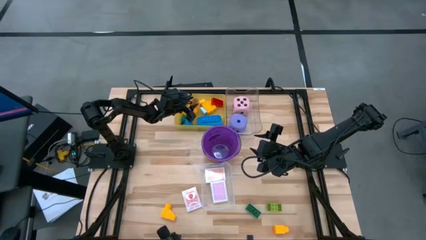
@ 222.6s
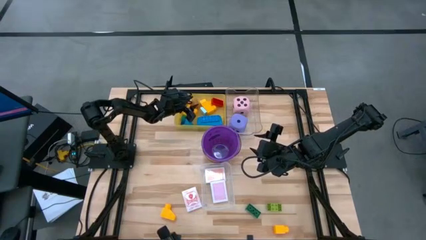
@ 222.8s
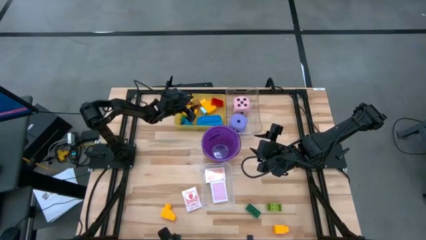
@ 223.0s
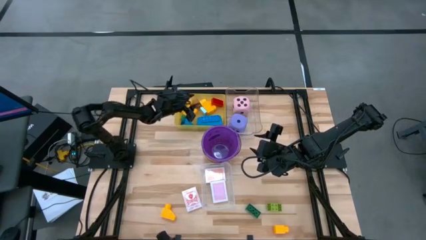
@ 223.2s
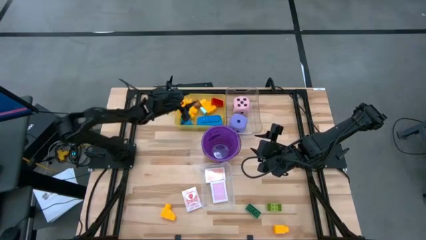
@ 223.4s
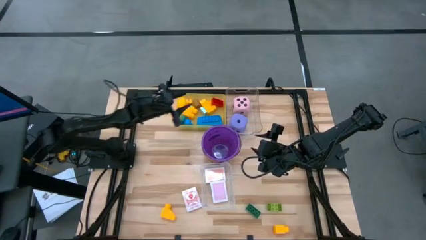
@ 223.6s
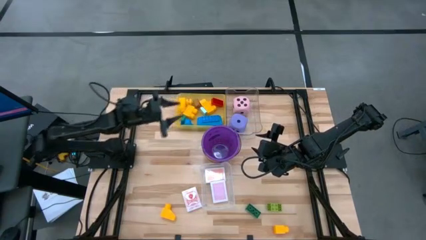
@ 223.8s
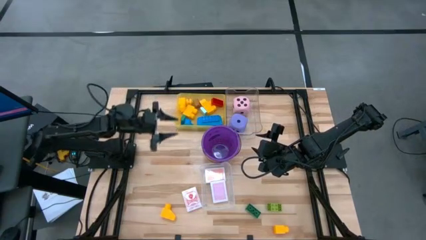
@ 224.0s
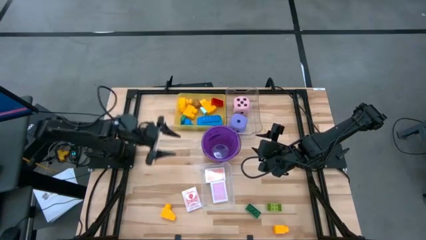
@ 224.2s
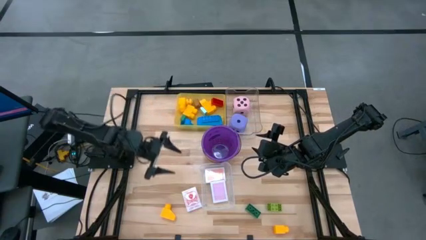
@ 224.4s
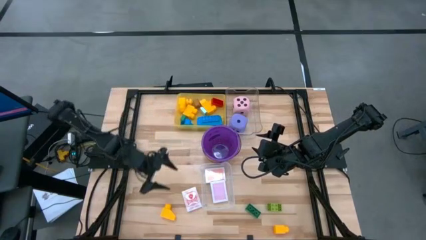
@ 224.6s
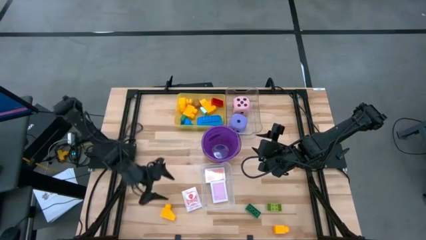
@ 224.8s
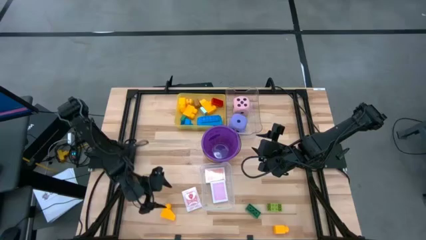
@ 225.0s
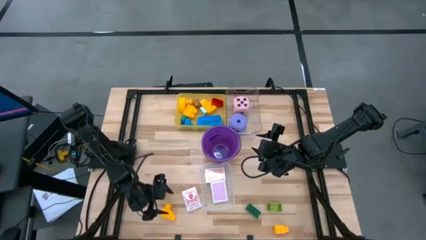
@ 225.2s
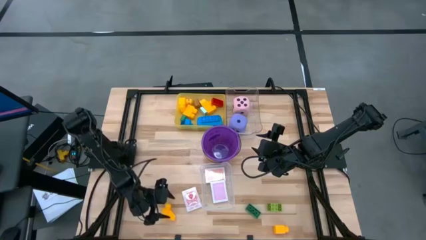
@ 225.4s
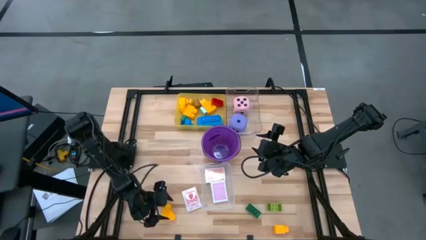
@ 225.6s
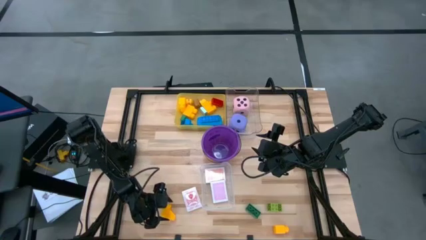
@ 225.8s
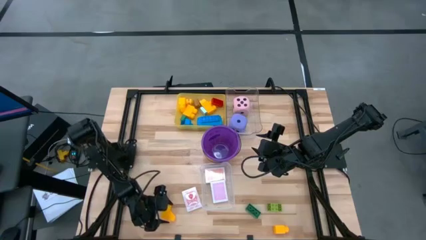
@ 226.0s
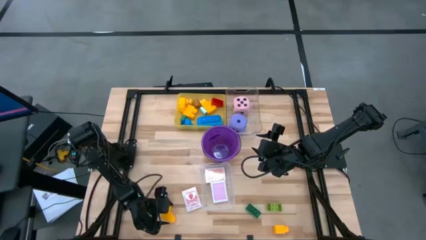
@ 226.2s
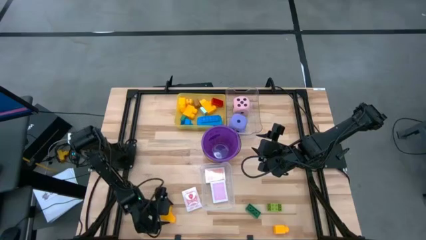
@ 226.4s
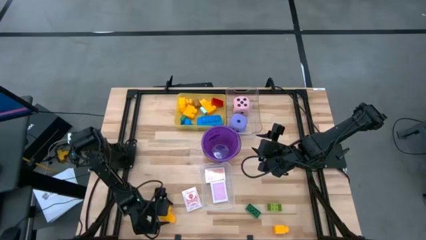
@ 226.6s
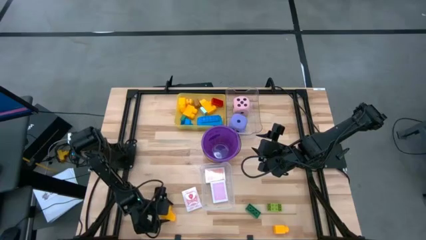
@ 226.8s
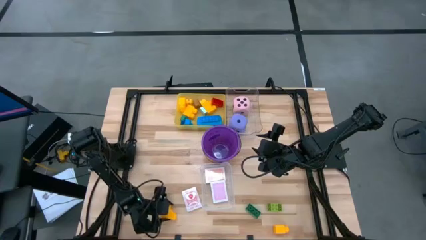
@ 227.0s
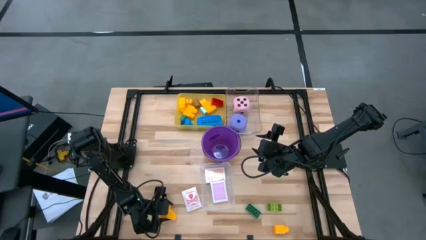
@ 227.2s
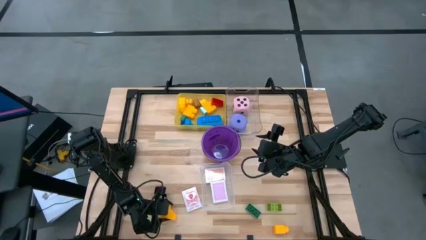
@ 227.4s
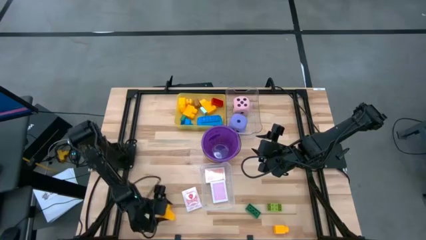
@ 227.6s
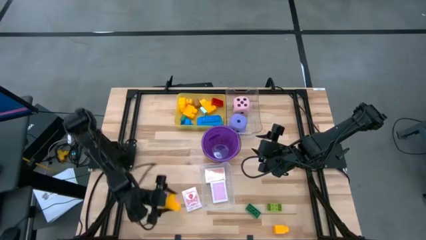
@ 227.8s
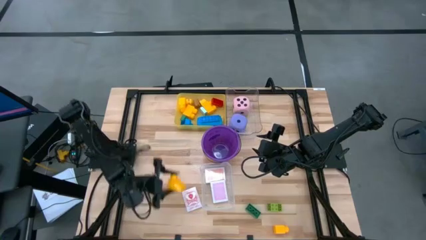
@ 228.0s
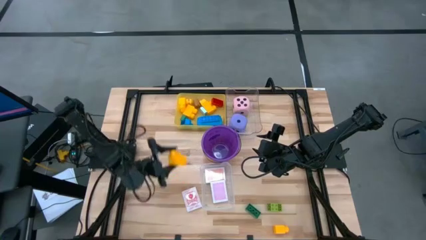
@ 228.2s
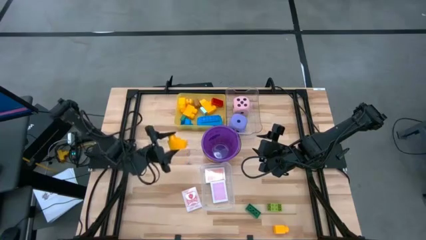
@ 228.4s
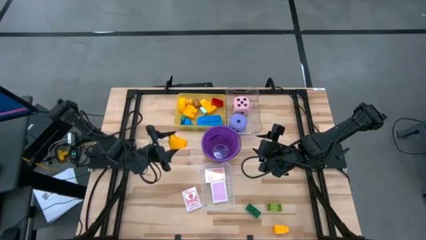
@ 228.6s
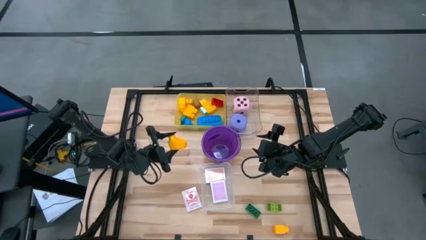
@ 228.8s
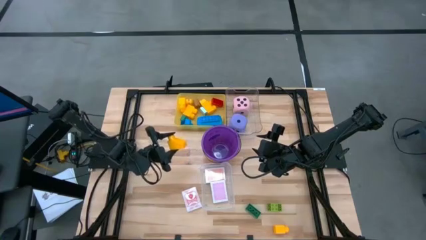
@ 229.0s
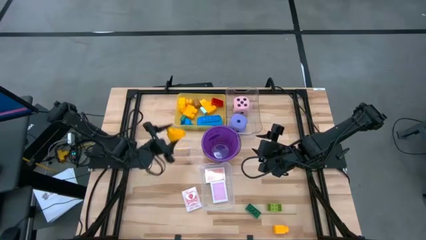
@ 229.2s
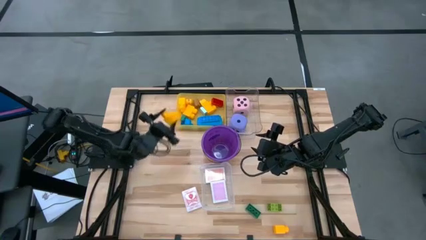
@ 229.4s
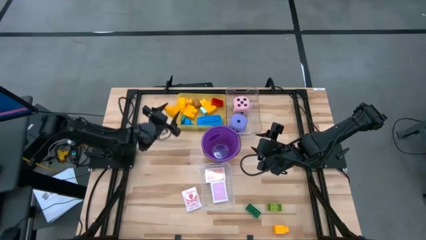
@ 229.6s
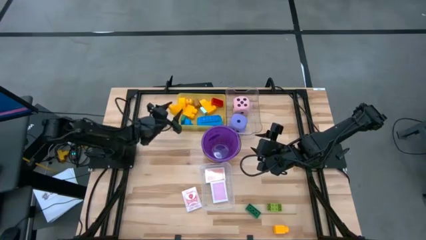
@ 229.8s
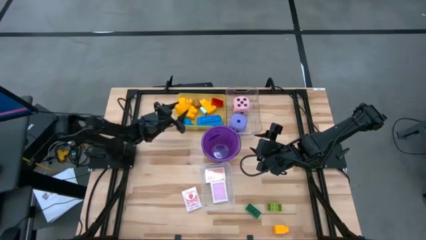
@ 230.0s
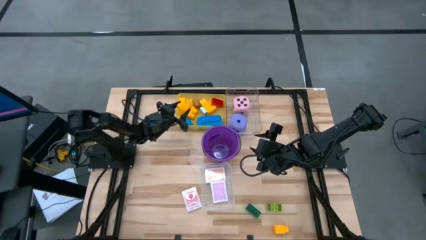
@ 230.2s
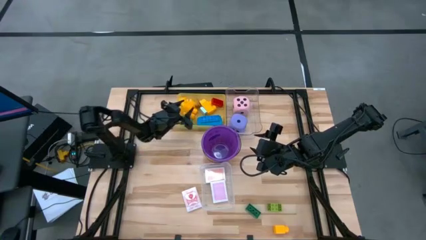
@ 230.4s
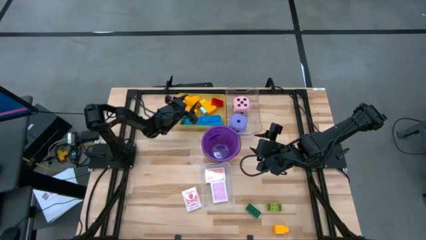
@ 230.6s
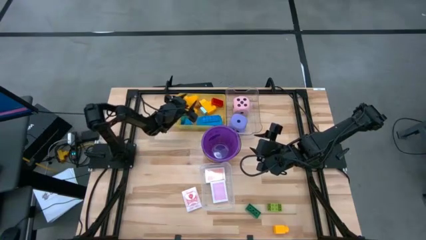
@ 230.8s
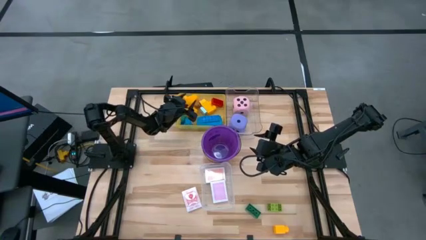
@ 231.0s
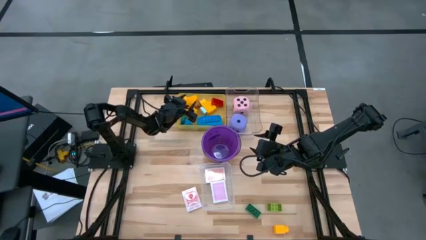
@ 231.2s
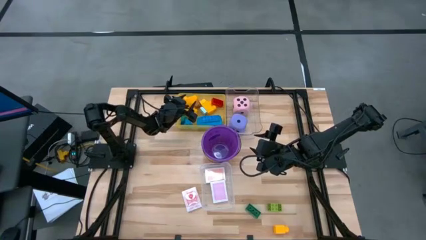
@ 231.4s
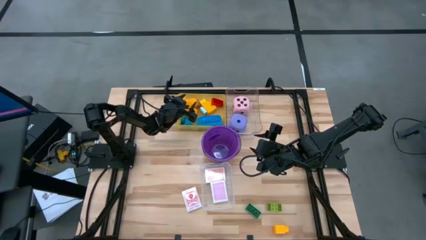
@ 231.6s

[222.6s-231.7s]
Task: Pick & Place Toys
Put the yellow game piece into the yellow bin

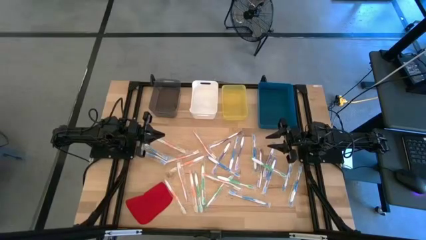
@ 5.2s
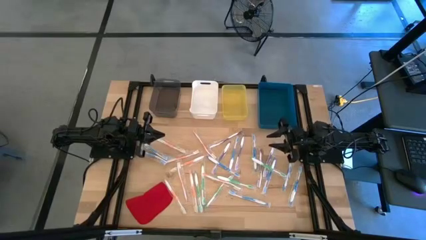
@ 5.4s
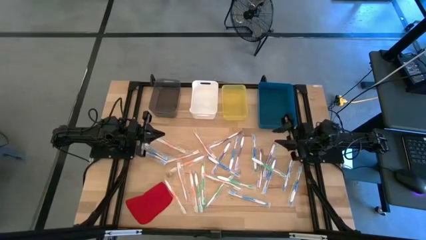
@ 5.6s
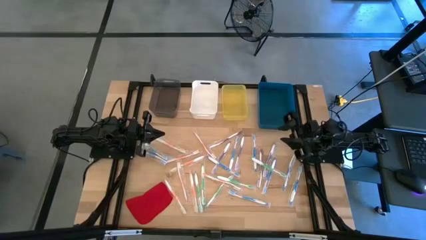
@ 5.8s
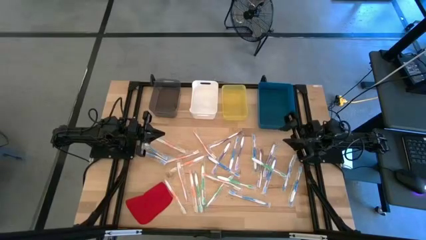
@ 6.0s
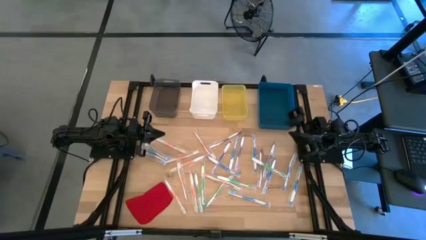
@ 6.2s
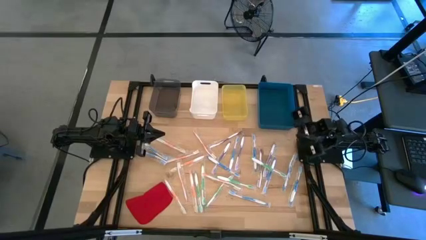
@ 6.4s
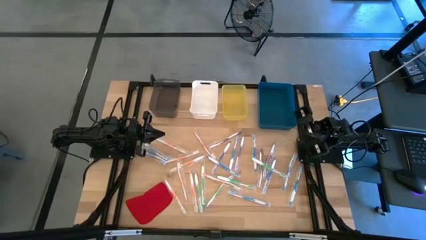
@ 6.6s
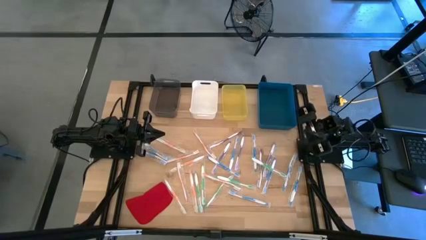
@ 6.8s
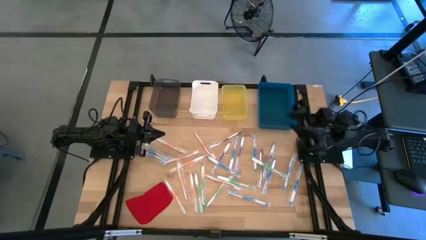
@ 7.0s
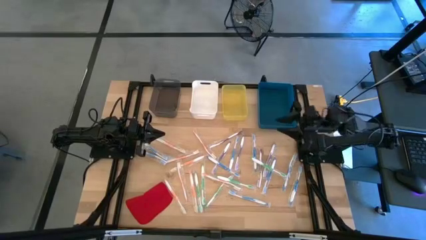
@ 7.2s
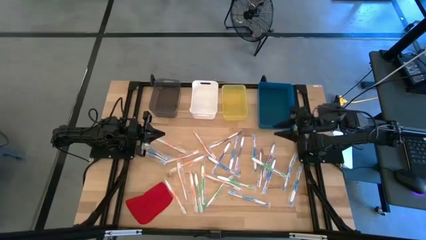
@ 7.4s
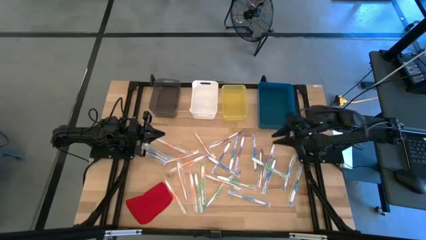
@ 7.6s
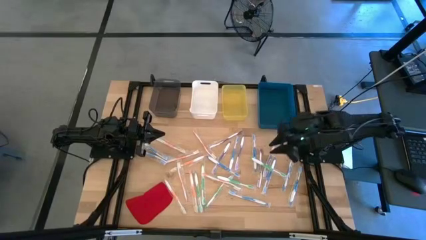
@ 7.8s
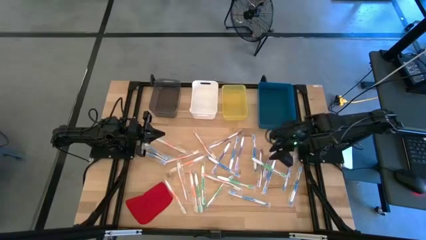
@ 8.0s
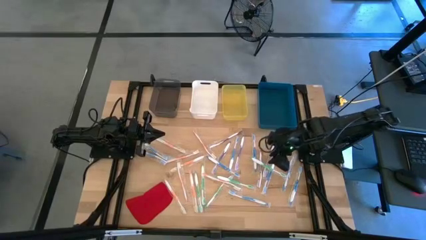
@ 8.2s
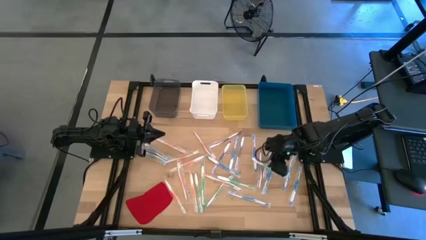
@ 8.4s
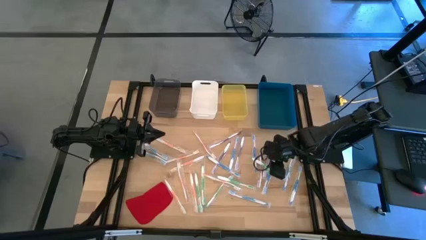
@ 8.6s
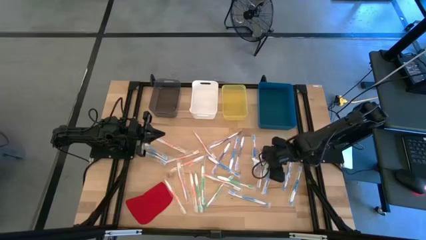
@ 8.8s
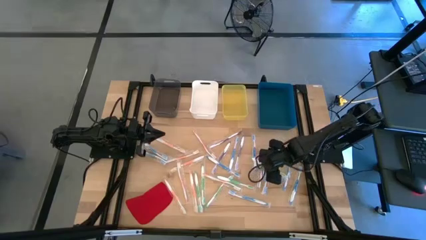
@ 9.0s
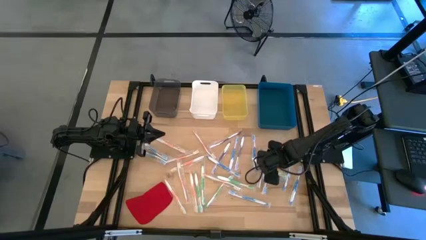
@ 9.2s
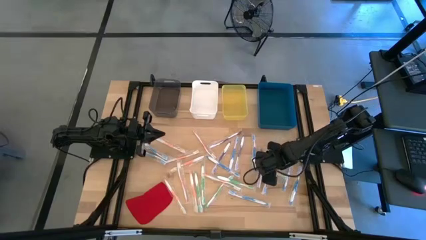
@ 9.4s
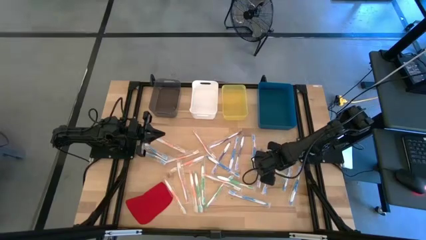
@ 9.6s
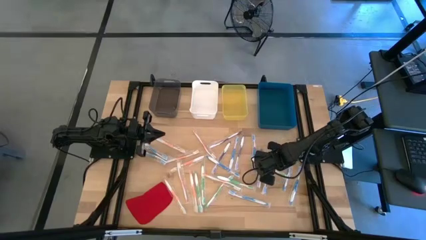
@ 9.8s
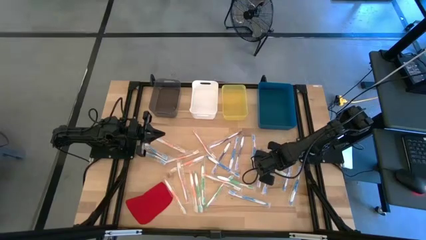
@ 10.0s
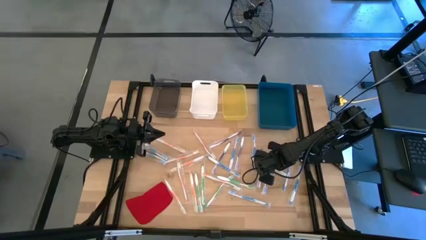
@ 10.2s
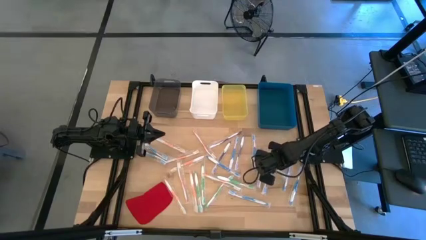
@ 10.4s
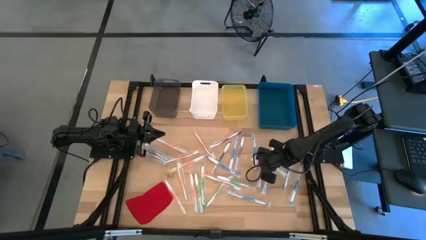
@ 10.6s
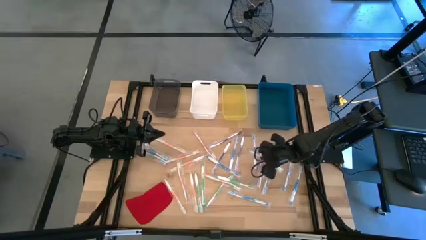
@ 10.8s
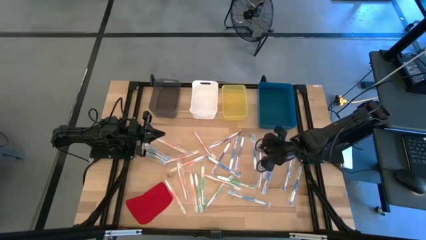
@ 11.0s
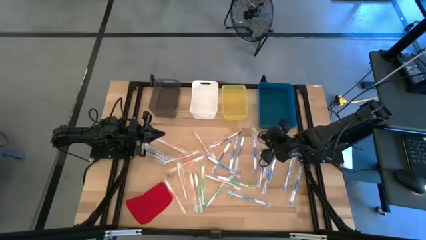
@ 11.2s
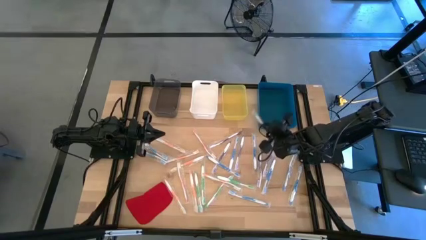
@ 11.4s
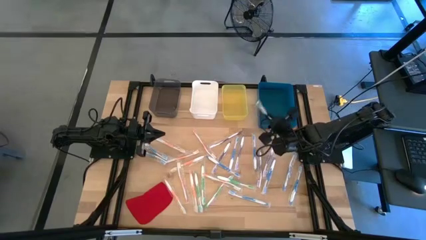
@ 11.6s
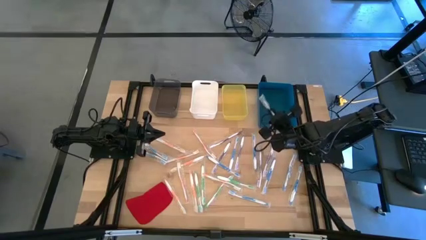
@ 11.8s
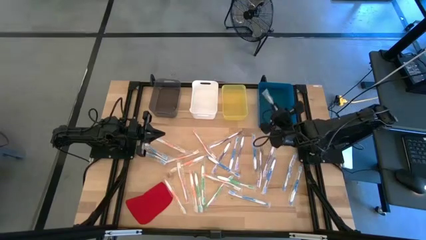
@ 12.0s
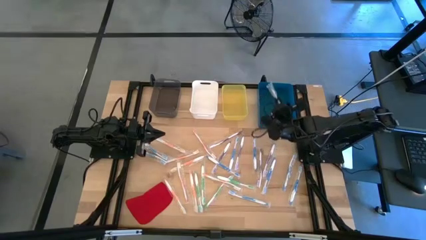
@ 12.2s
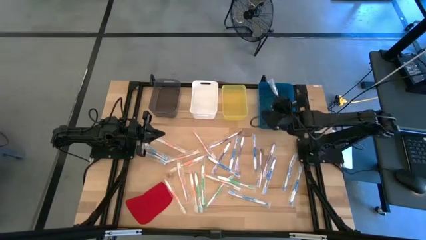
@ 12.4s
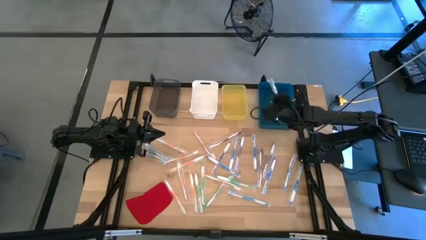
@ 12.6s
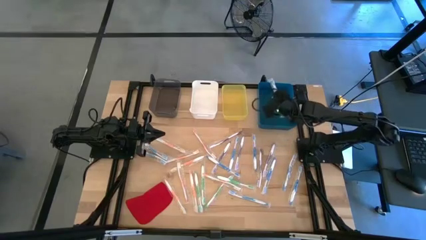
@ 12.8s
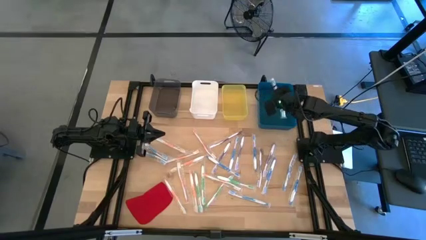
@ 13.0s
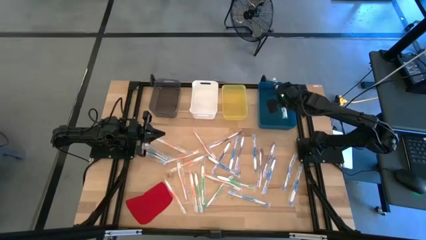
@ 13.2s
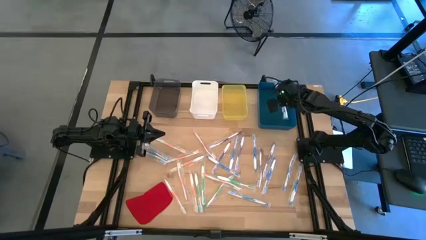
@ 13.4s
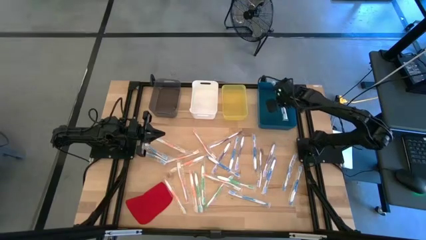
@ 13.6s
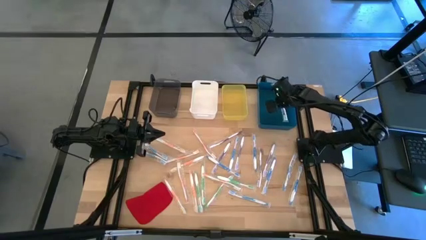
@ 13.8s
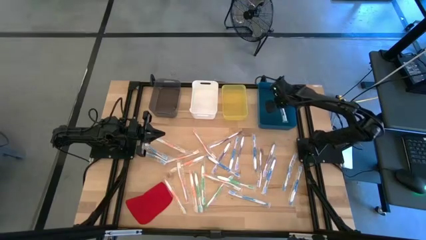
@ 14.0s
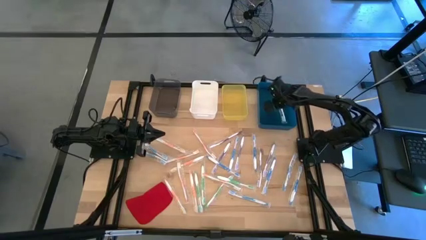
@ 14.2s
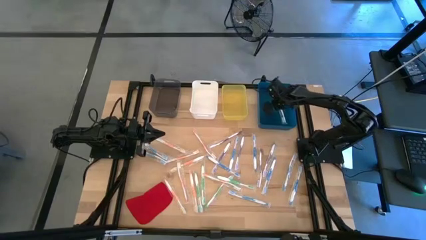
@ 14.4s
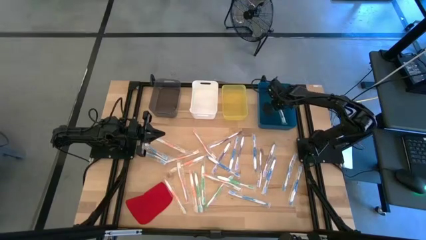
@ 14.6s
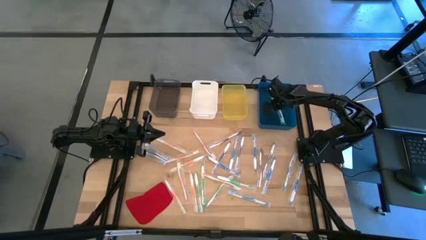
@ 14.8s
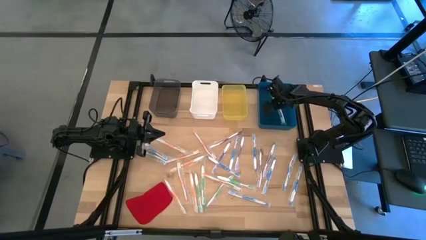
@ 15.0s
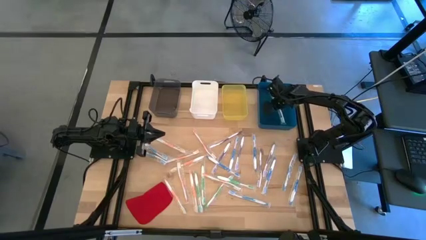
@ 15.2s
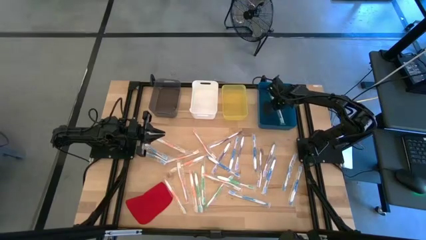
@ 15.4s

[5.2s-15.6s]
Task: Pick & Place Toothbrushes
Put the green toothbrush into the blue bin
